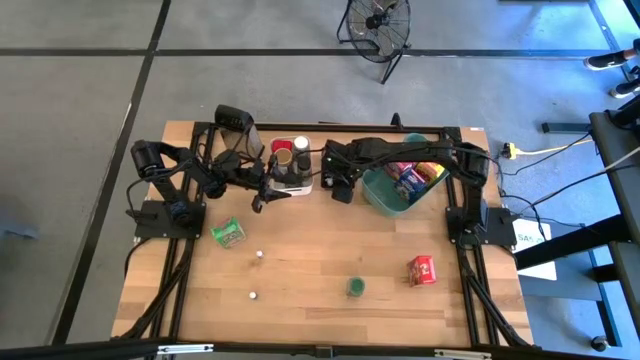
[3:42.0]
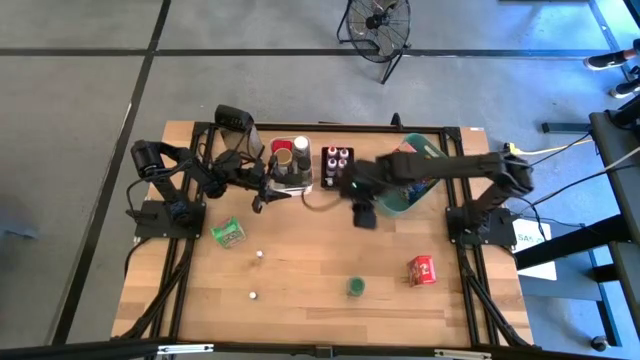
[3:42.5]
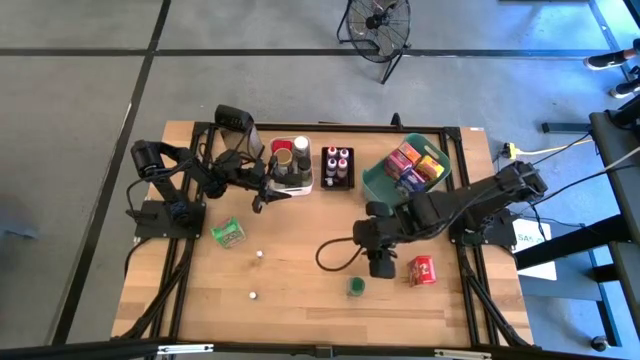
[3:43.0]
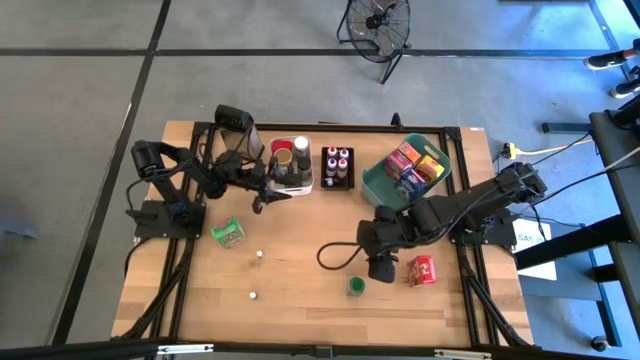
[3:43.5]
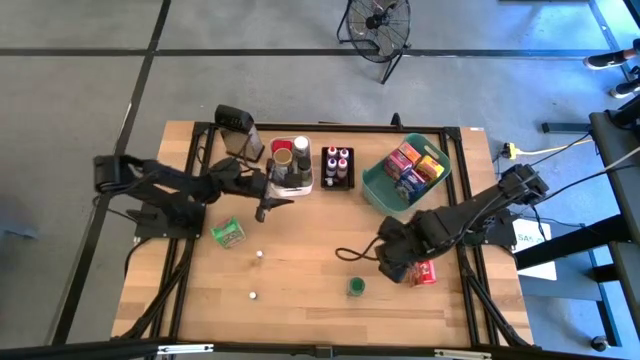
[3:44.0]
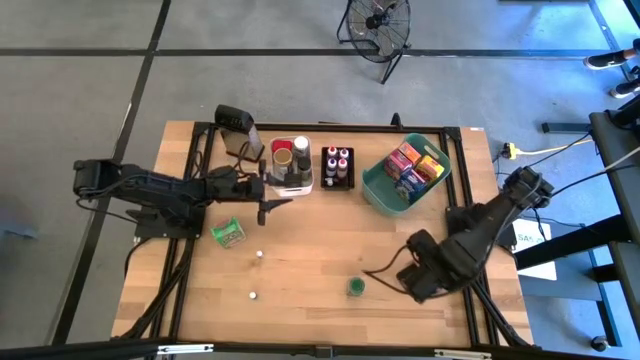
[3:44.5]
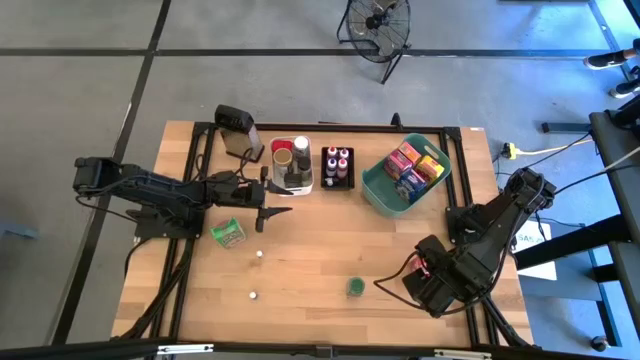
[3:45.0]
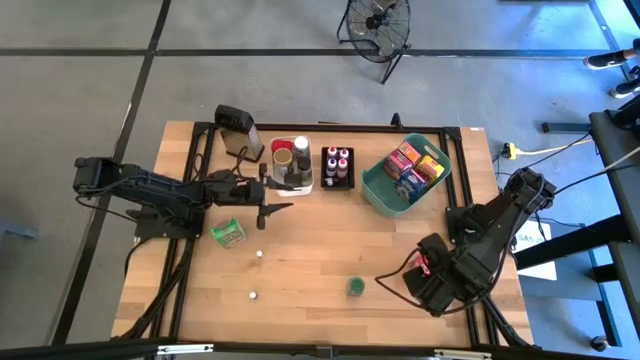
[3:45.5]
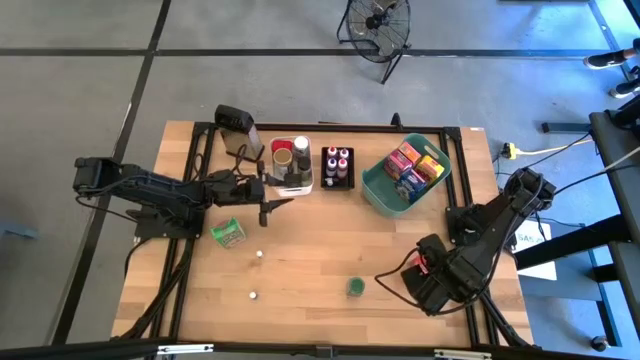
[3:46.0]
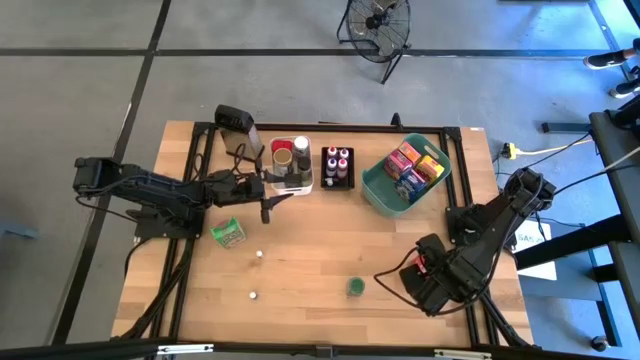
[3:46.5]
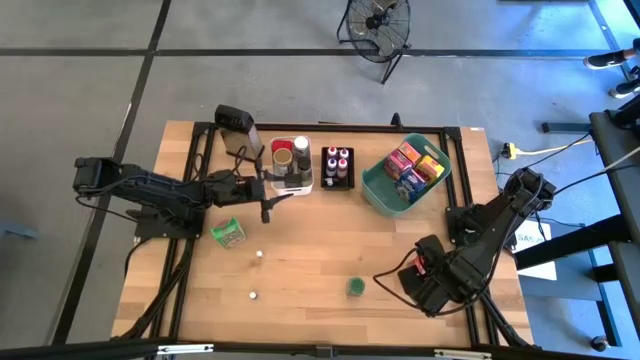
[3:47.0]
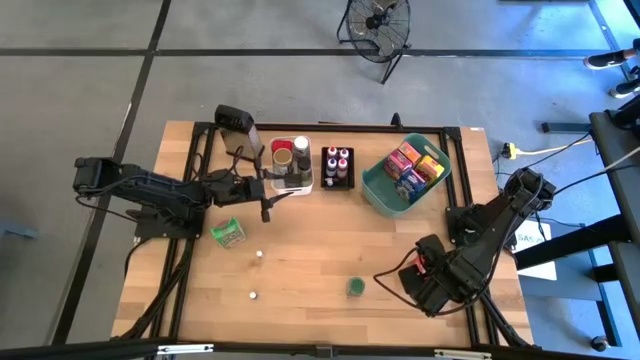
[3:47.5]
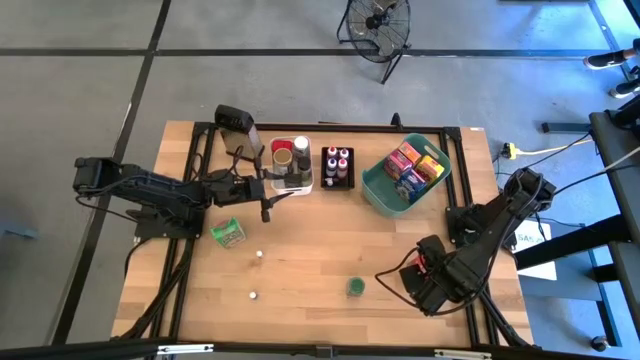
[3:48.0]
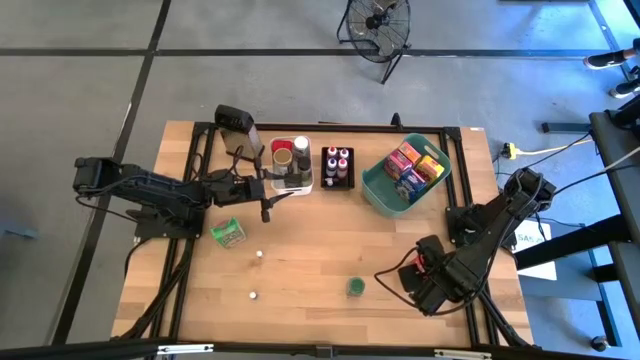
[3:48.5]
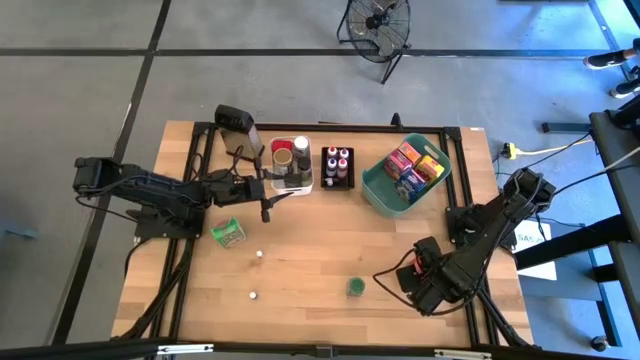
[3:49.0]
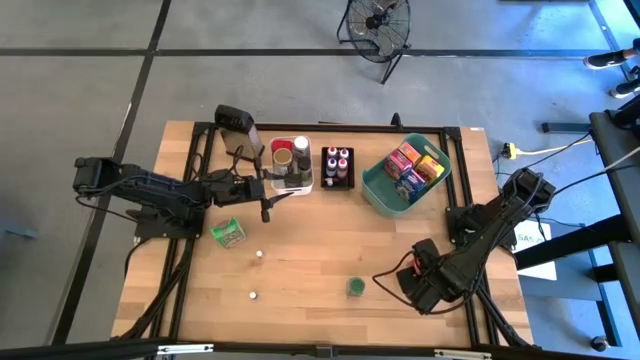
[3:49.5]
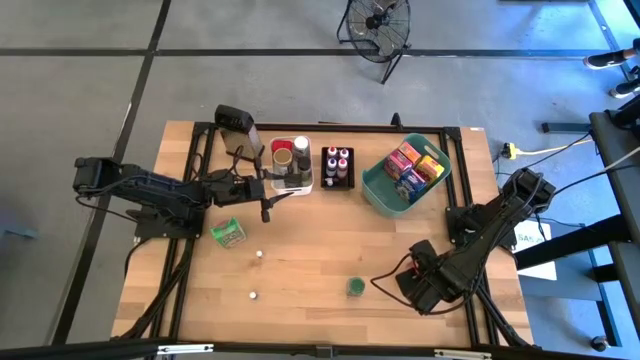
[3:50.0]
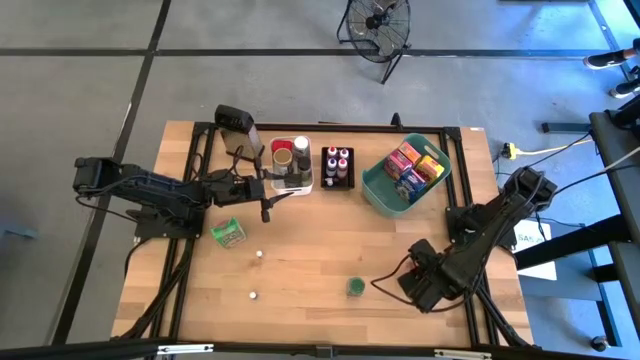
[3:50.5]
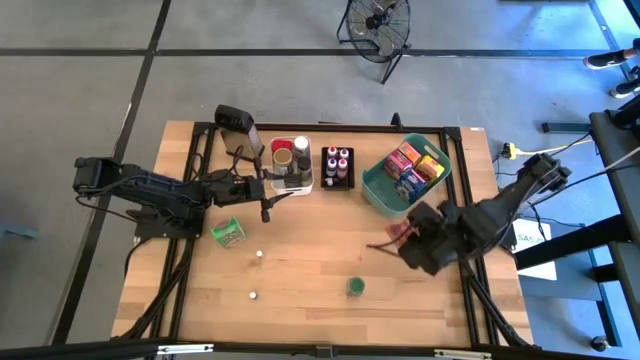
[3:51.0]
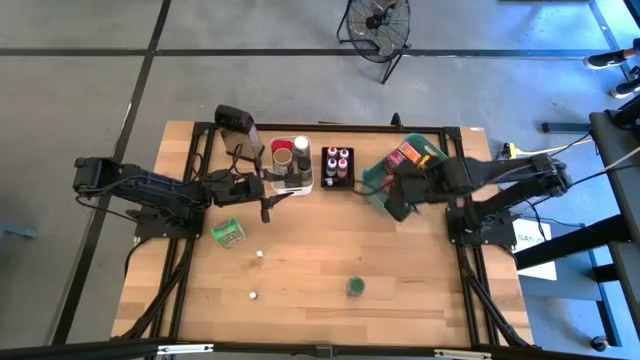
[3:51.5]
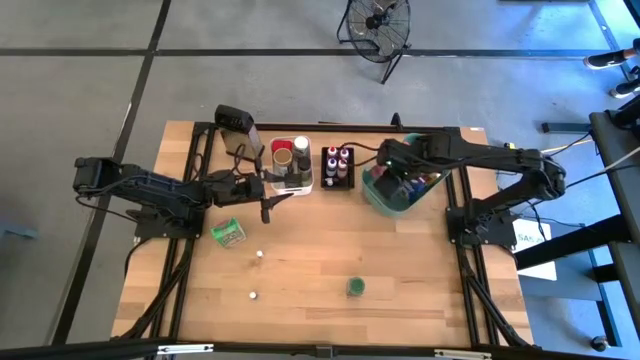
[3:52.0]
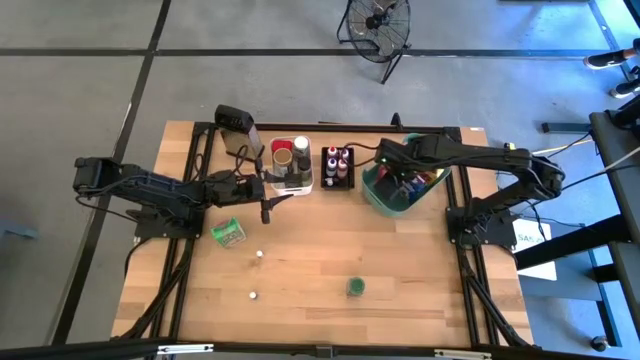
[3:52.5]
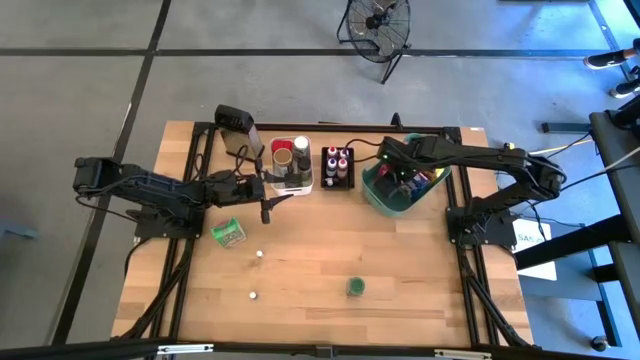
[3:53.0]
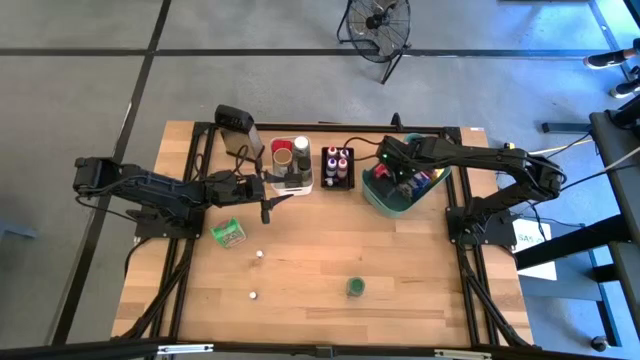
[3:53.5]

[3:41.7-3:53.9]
Task: Pick & Place Kitchen Items
Put the red cereal box into the green bin

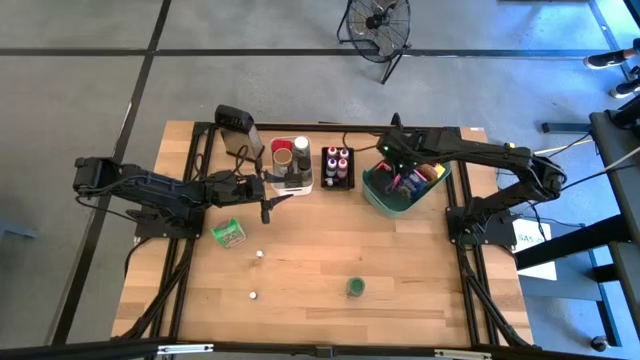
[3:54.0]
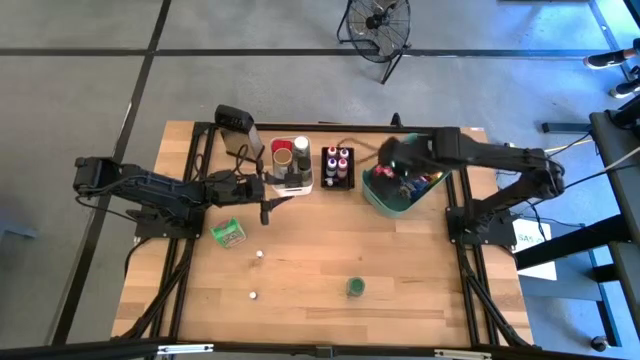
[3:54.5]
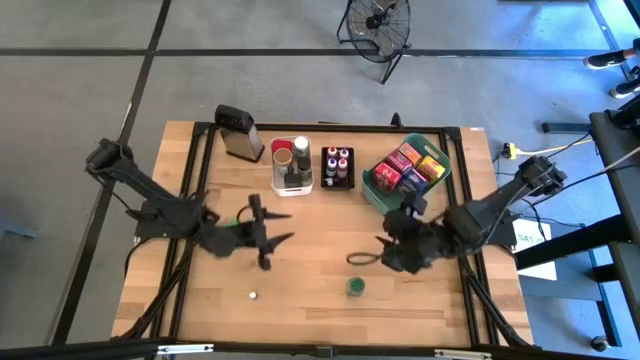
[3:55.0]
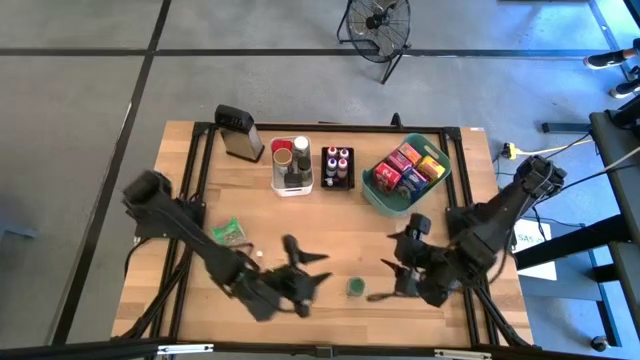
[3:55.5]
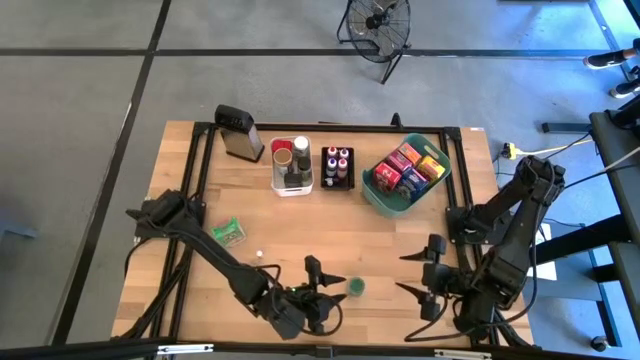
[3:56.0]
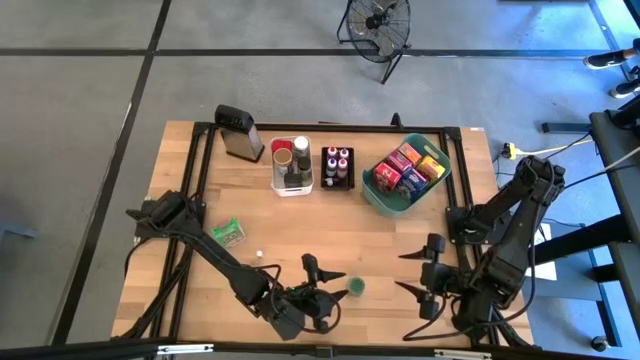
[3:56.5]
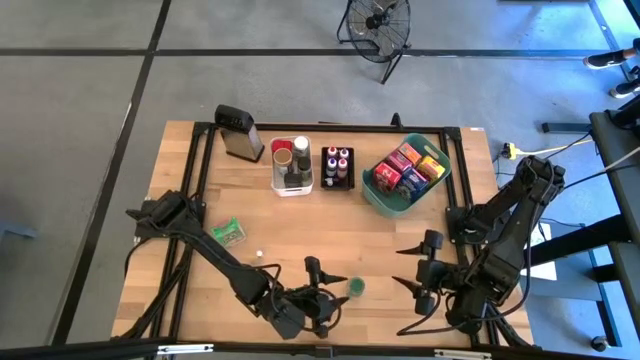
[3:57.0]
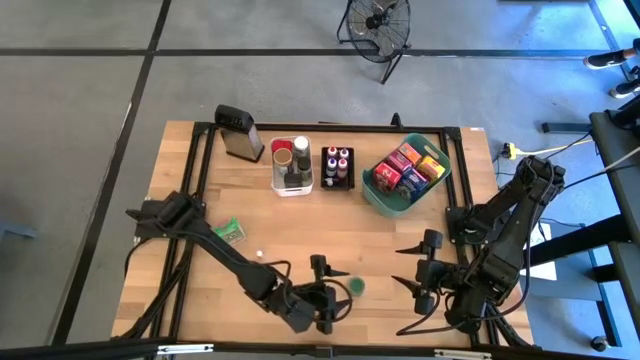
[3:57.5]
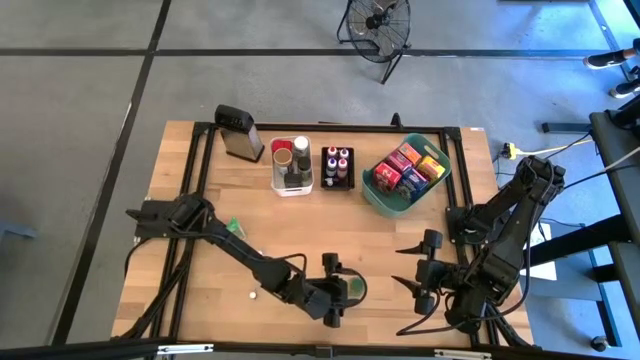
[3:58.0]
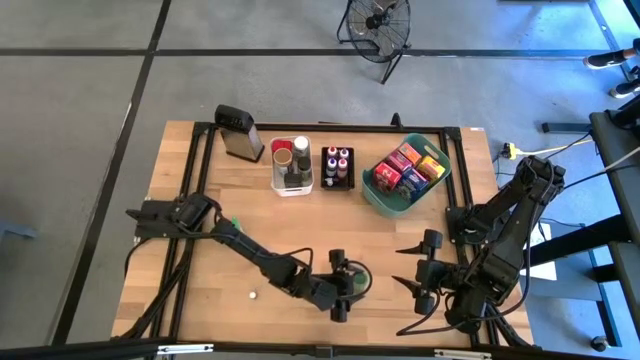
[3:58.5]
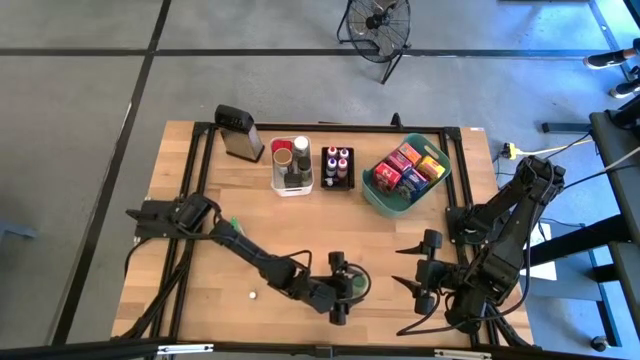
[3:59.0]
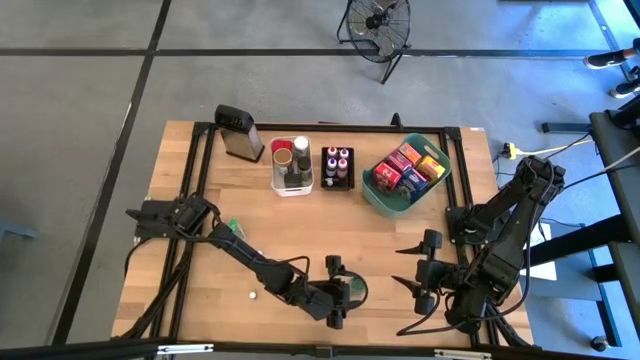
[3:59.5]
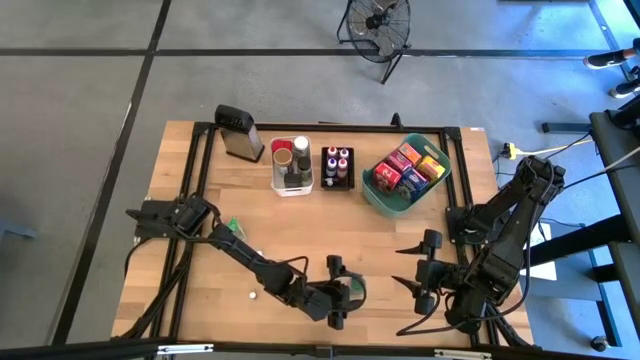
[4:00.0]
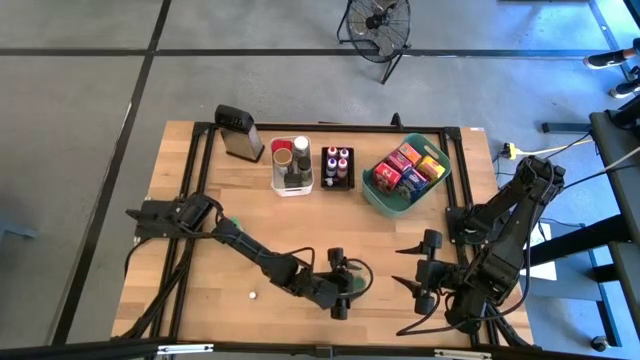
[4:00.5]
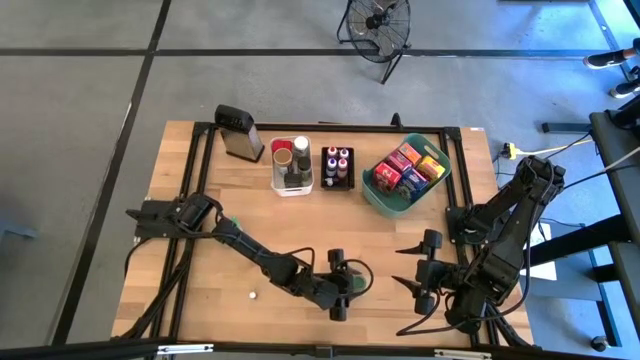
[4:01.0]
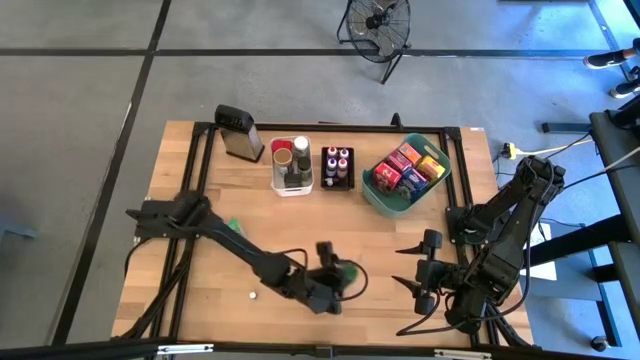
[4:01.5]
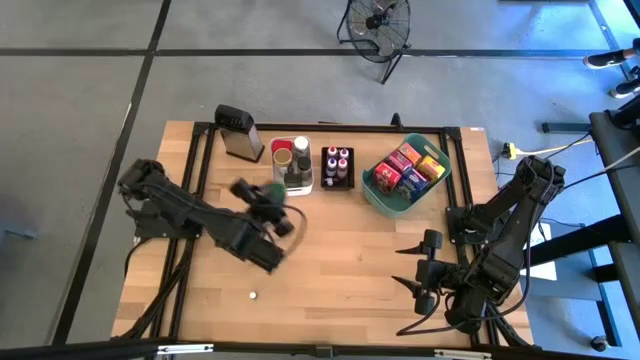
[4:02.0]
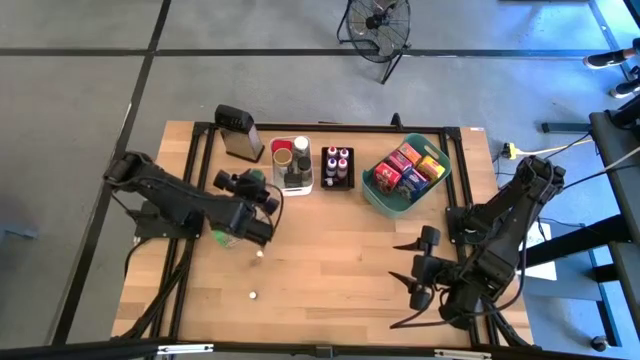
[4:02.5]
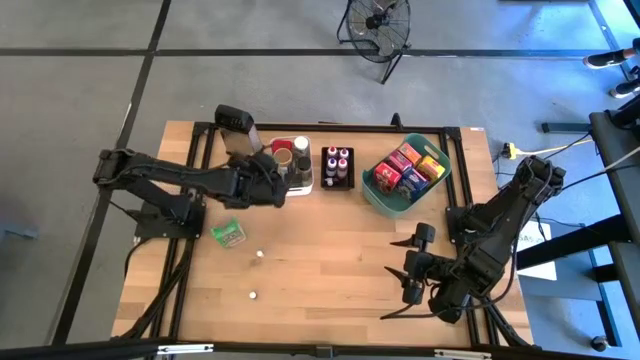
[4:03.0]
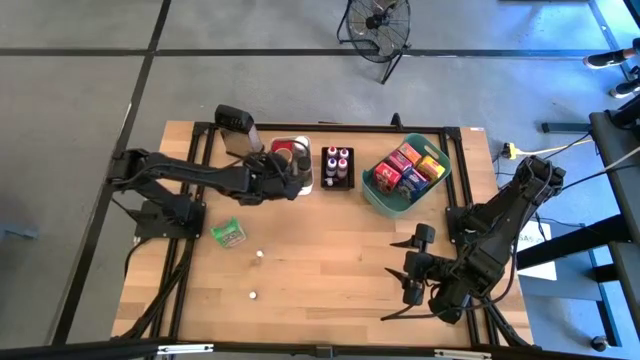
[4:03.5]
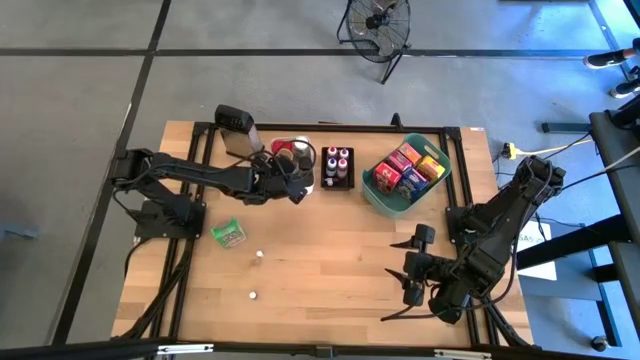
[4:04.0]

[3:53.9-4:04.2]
Put the green spice bottle into the white bin
